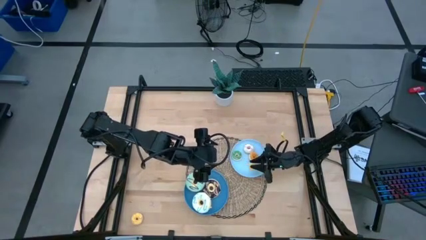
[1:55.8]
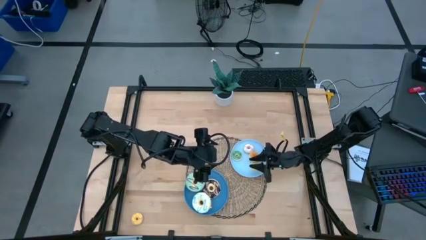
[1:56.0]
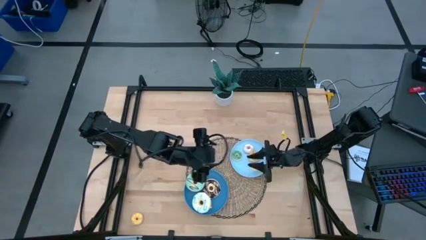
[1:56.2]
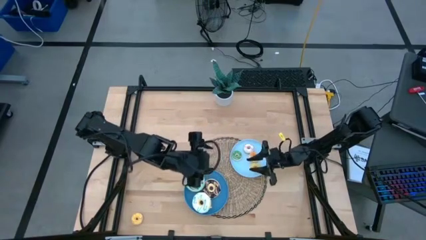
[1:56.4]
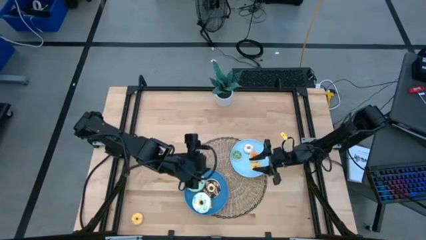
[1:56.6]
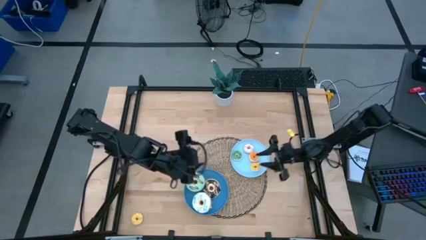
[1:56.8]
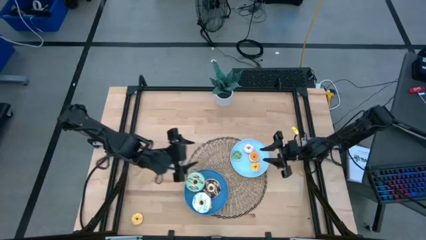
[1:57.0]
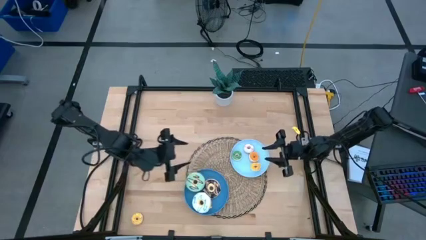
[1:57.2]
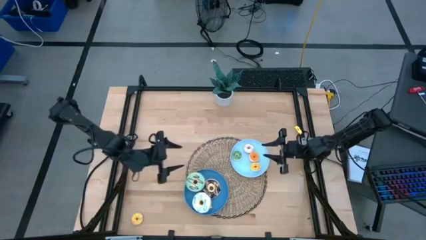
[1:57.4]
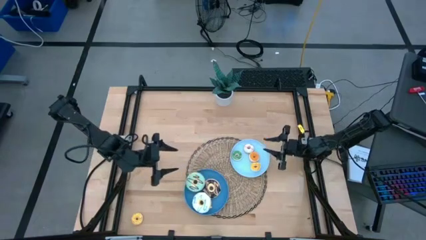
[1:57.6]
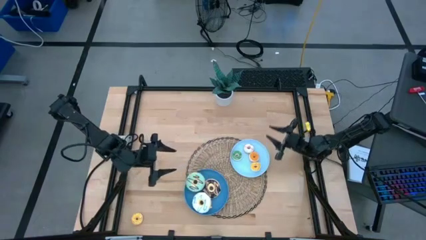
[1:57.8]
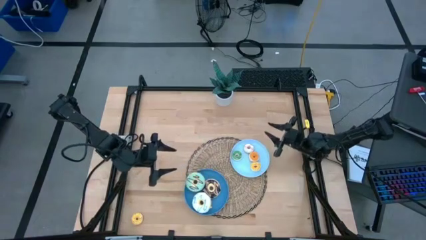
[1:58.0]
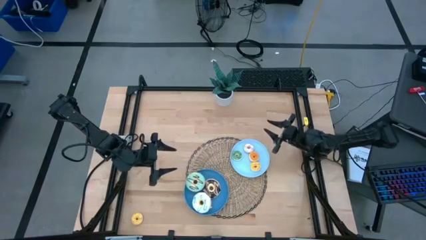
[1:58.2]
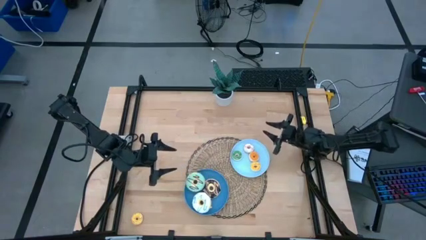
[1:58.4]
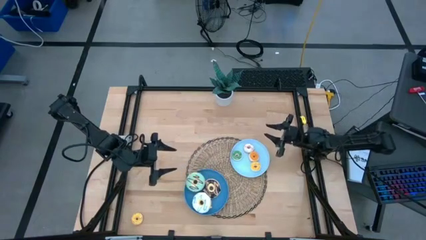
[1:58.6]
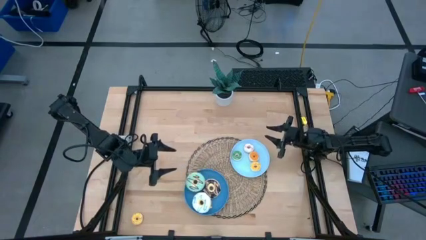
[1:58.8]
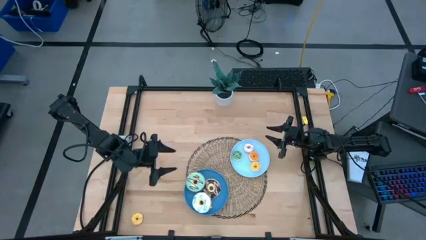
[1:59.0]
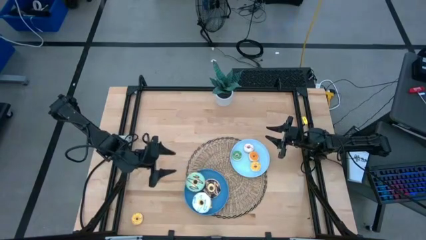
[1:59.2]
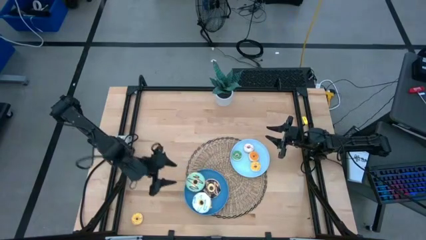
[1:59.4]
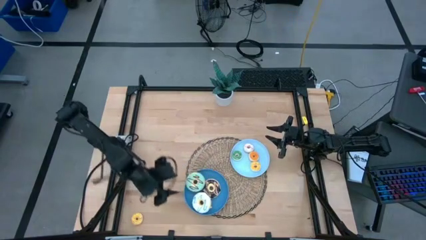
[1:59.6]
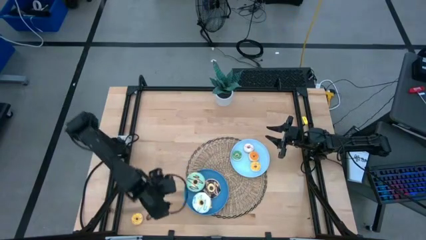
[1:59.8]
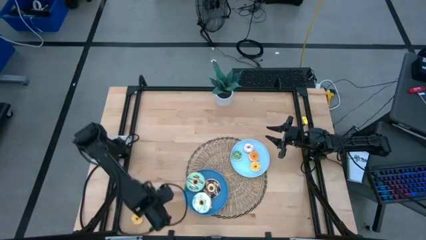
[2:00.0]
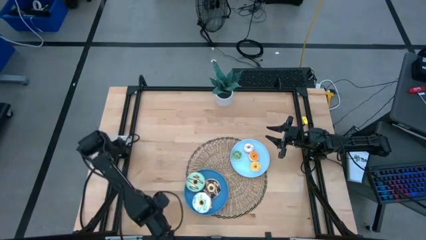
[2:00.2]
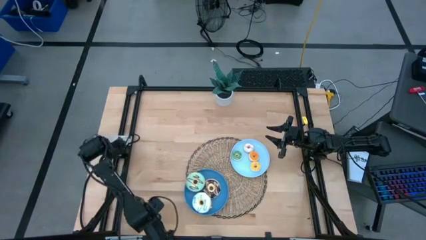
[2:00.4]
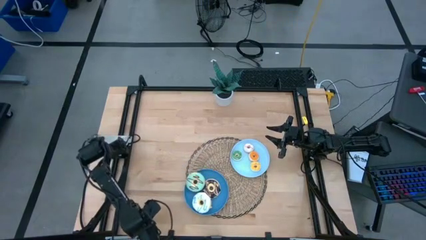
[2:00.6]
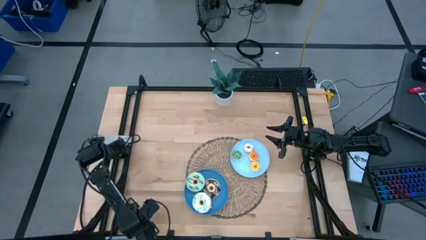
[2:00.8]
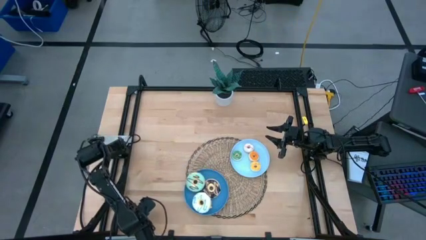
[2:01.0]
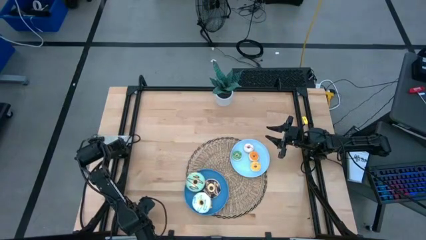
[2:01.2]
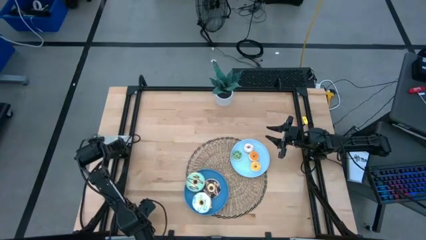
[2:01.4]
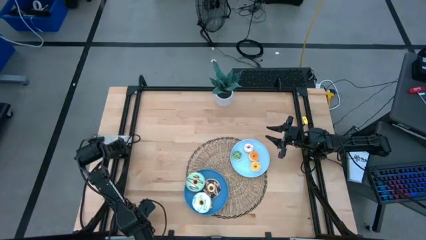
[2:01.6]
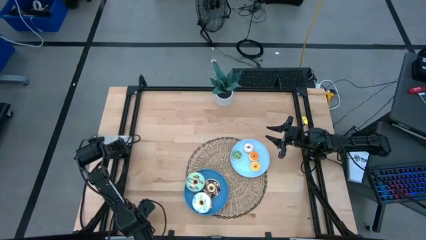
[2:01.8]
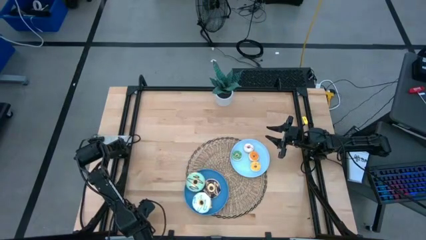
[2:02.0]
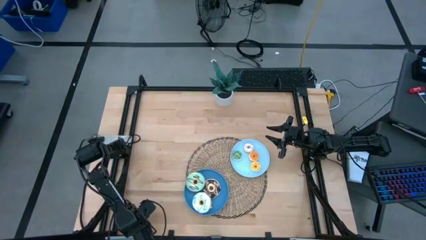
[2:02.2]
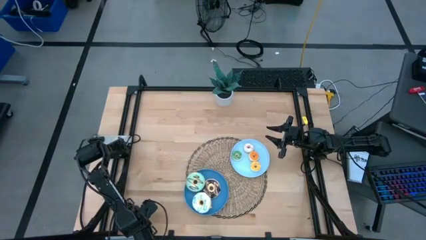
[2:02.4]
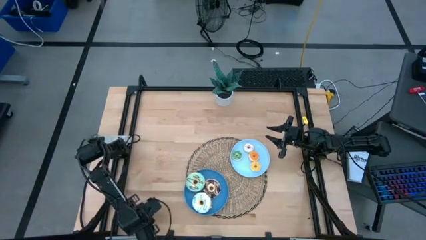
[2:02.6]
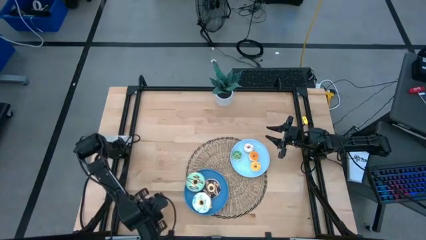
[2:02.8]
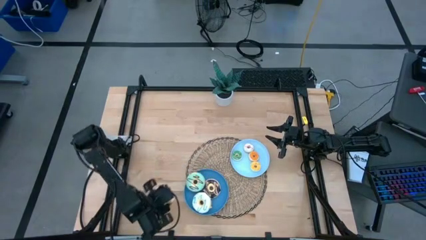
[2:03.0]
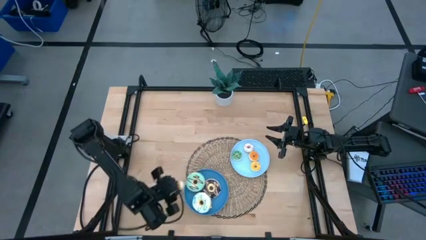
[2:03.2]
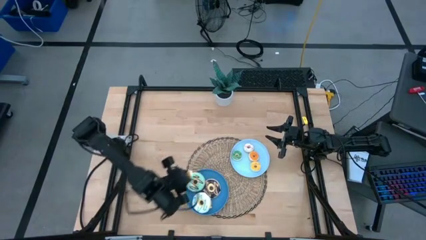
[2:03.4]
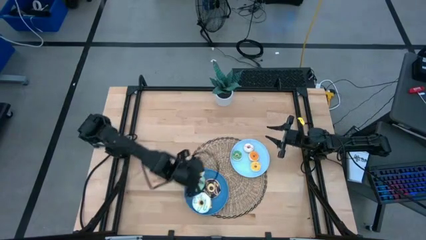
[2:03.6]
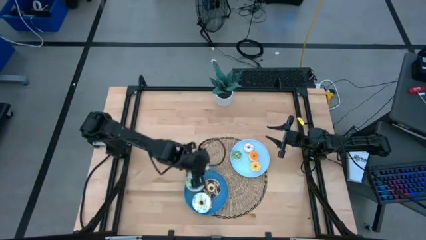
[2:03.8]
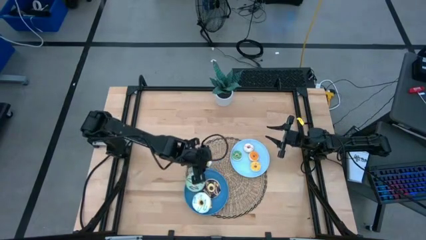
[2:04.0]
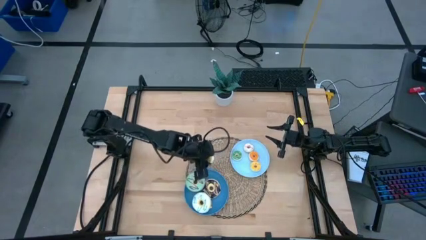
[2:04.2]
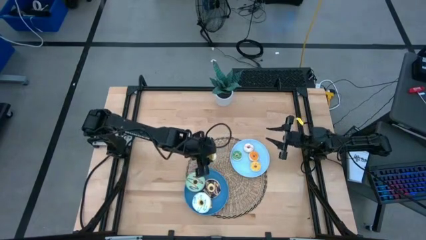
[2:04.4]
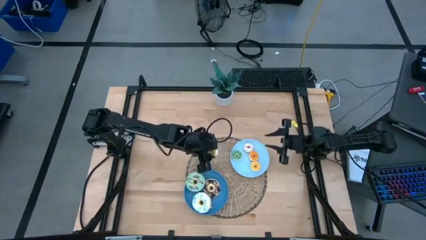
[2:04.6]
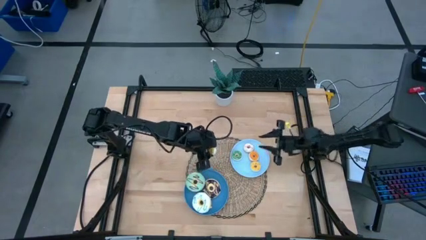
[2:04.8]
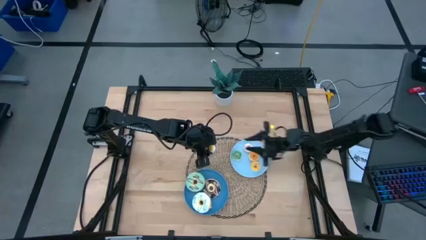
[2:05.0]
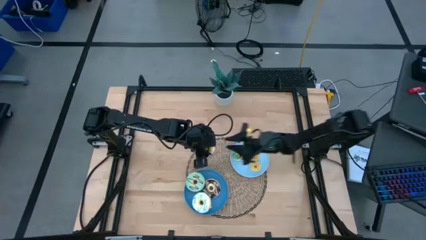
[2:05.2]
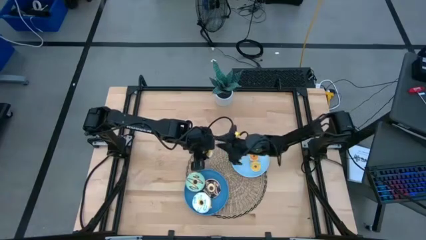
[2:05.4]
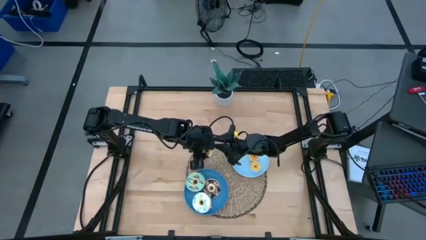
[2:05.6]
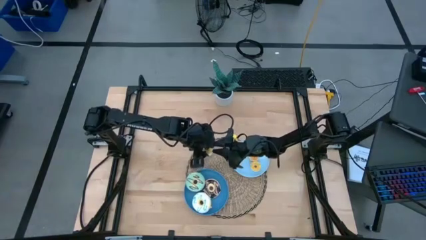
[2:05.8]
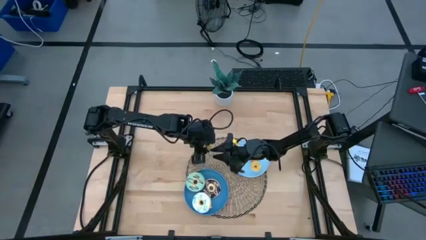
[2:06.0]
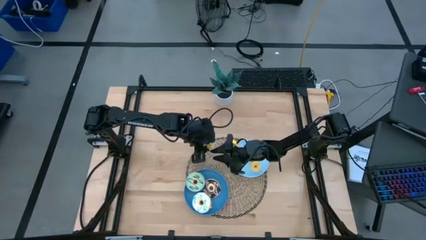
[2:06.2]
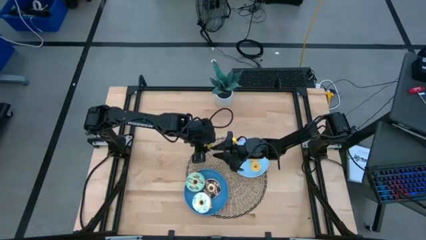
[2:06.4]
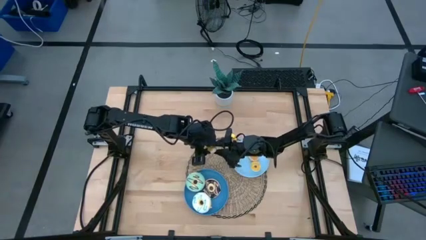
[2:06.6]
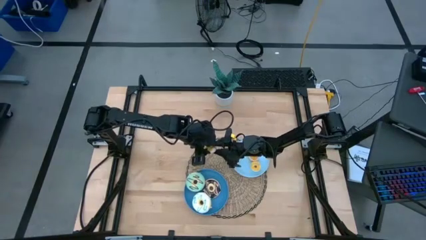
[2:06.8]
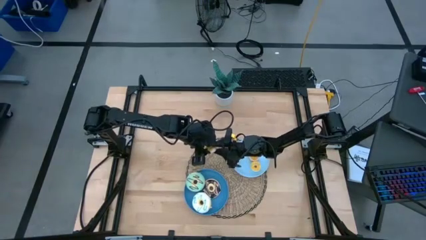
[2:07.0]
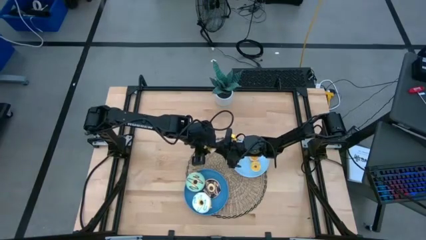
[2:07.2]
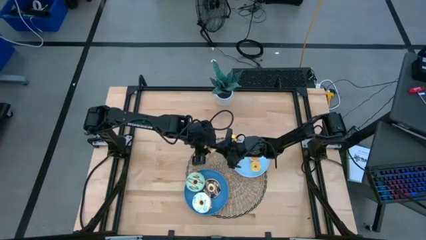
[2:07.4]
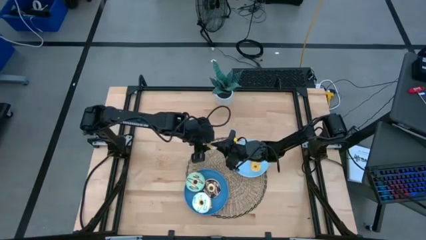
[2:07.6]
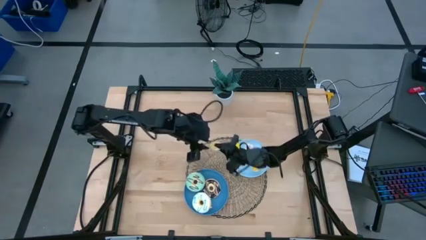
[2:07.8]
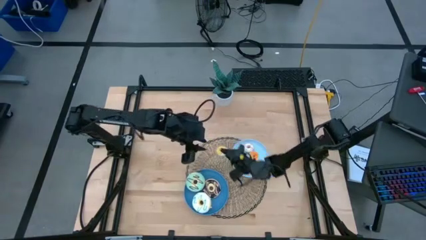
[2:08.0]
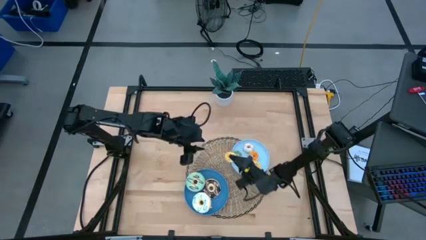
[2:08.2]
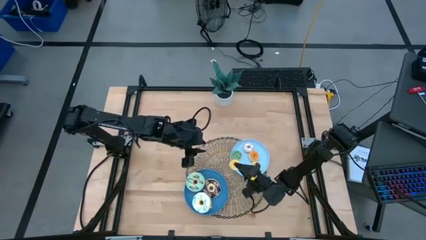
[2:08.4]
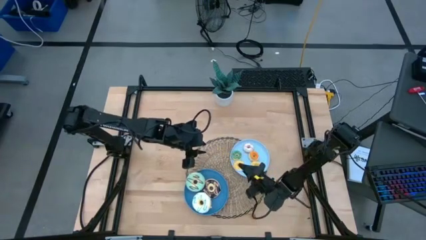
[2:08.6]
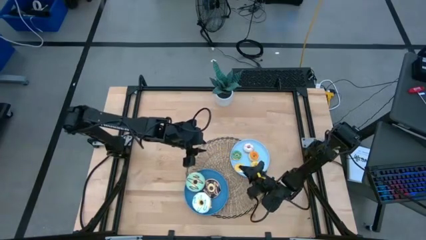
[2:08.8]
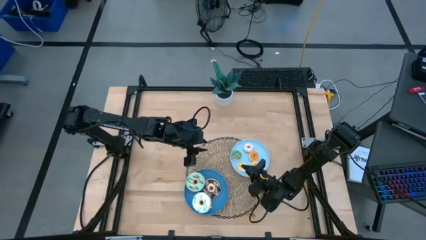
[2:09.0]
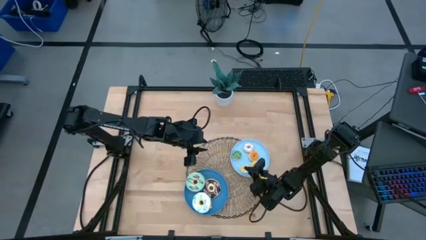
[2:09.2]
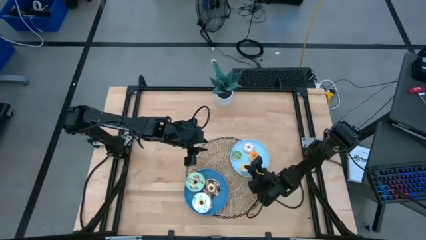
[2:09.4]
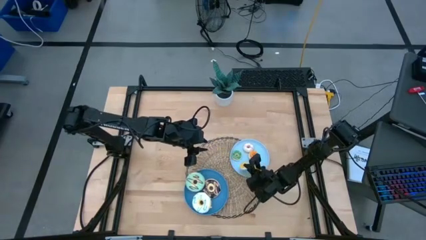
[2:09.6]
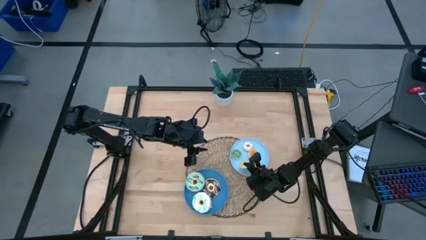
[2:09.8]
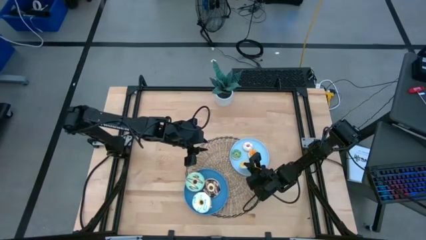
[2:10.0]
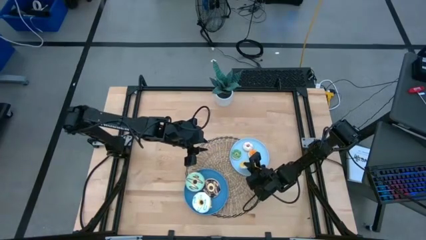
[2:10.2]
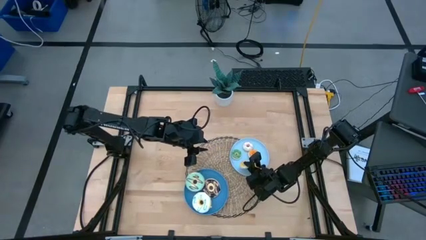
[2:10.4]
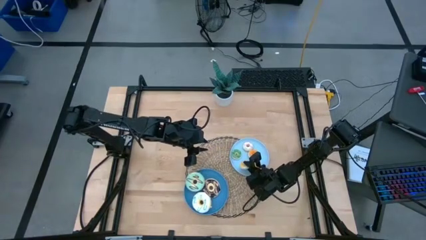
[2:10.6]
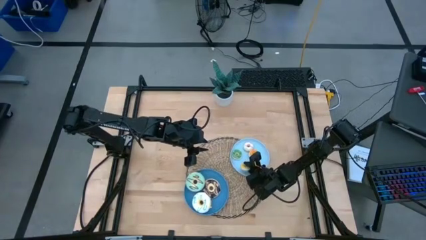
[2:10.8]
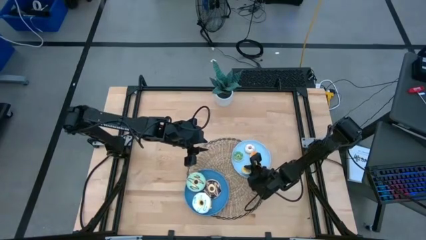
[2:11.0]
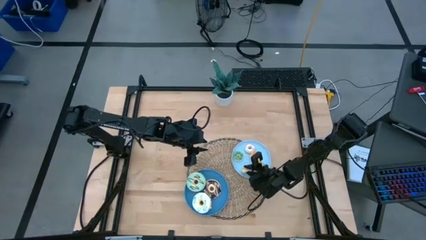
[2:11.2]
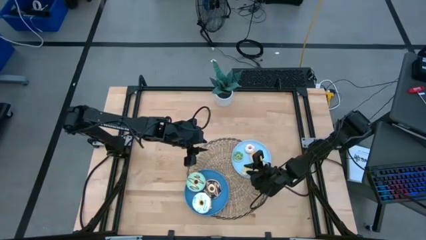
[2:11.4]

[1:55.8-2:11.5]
Task: Pick & Place donuts
Put the small yellow donut on the light blue plate
